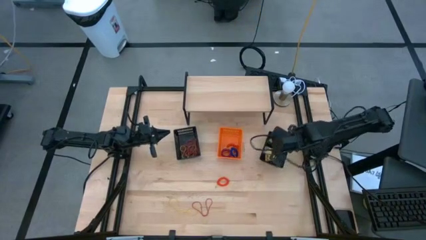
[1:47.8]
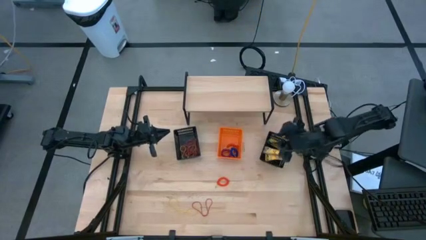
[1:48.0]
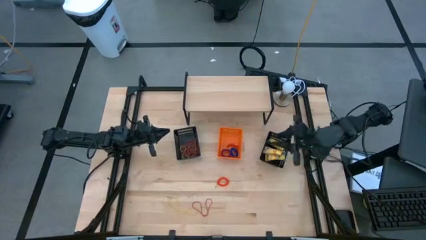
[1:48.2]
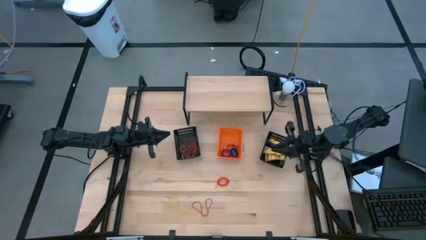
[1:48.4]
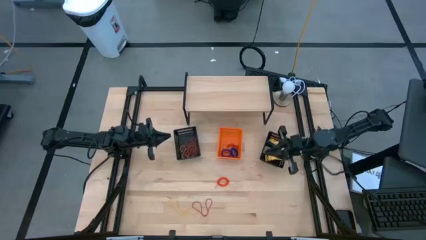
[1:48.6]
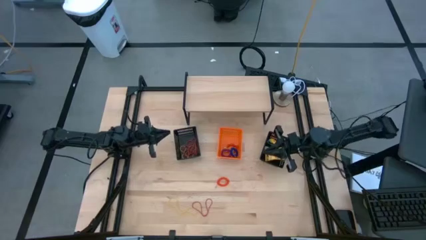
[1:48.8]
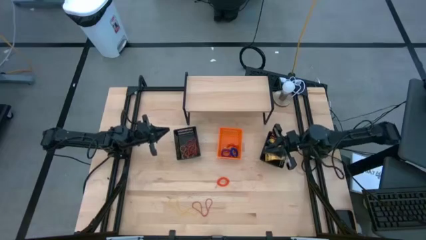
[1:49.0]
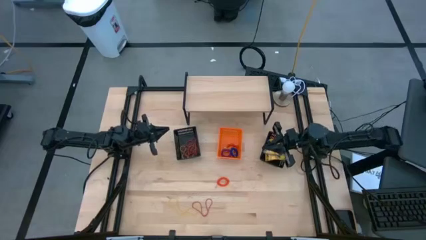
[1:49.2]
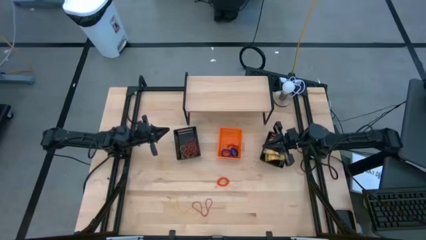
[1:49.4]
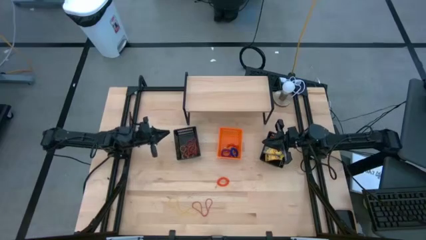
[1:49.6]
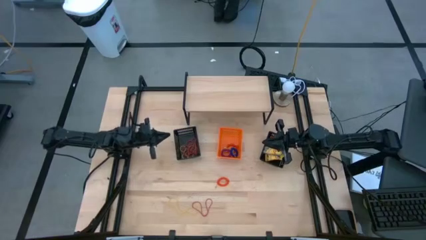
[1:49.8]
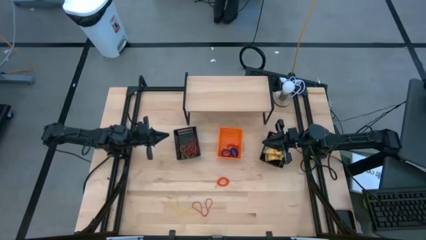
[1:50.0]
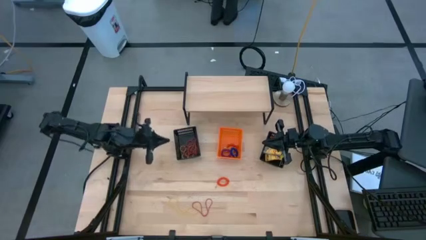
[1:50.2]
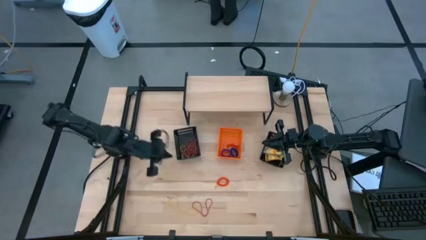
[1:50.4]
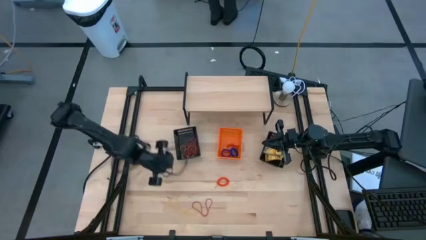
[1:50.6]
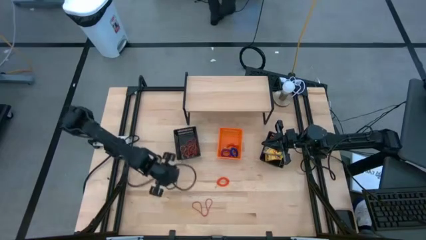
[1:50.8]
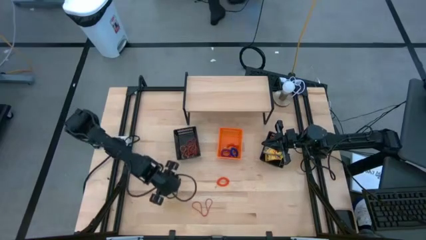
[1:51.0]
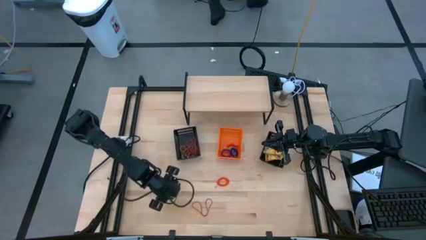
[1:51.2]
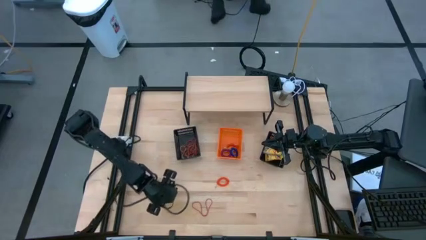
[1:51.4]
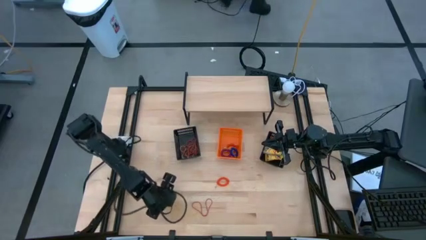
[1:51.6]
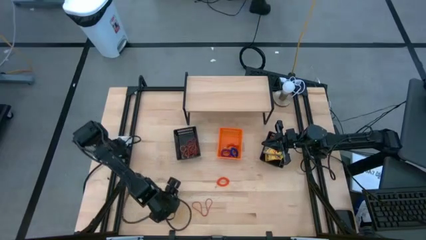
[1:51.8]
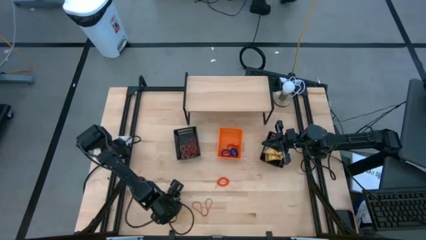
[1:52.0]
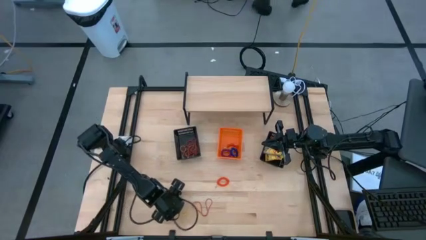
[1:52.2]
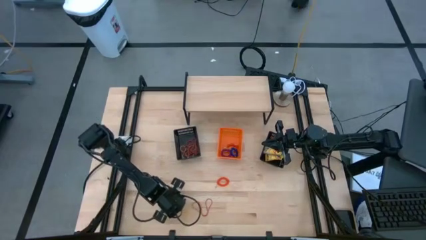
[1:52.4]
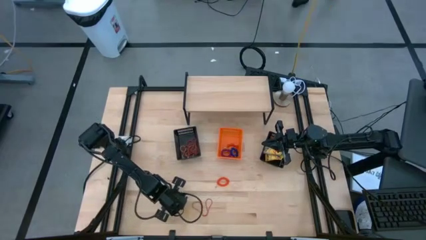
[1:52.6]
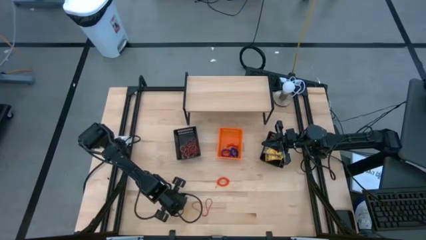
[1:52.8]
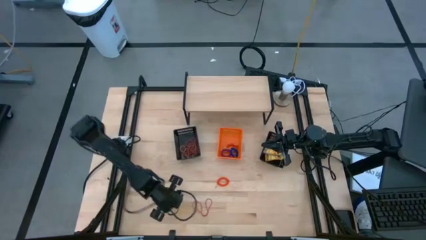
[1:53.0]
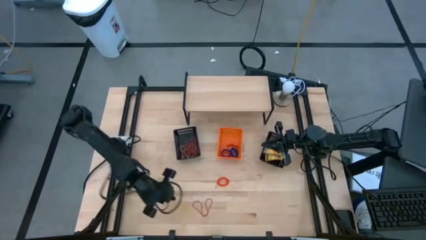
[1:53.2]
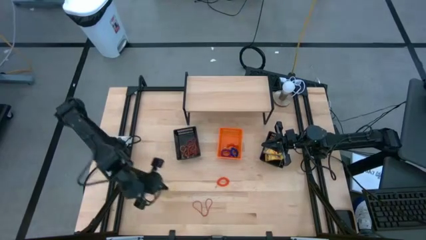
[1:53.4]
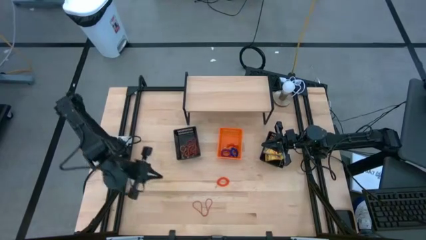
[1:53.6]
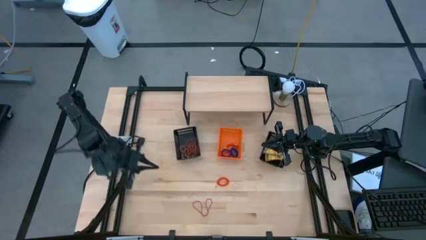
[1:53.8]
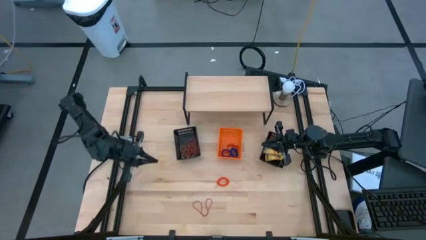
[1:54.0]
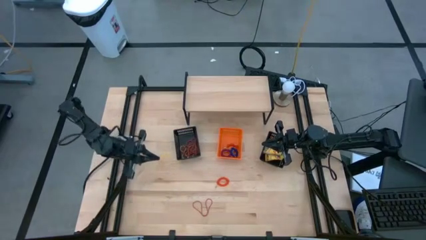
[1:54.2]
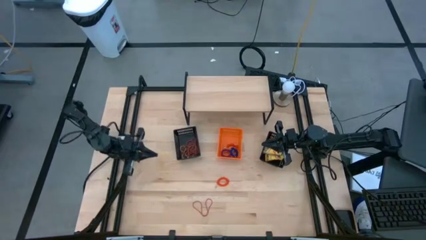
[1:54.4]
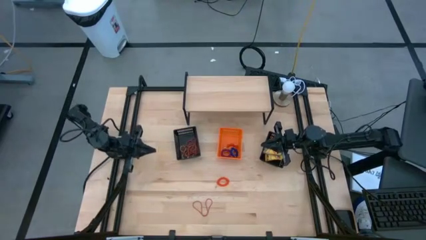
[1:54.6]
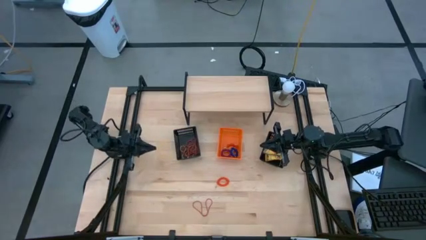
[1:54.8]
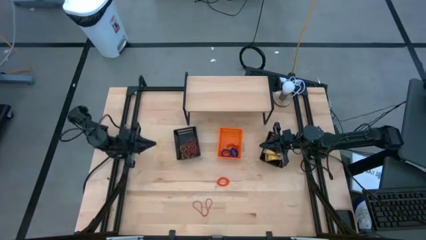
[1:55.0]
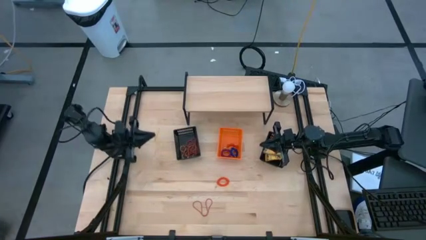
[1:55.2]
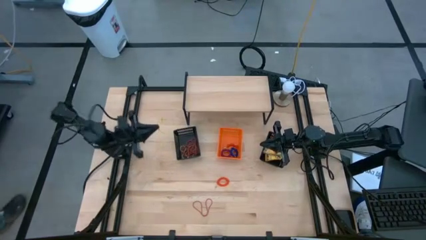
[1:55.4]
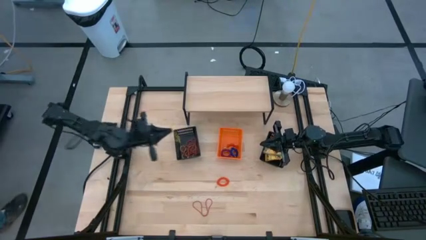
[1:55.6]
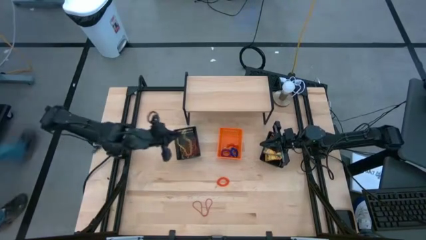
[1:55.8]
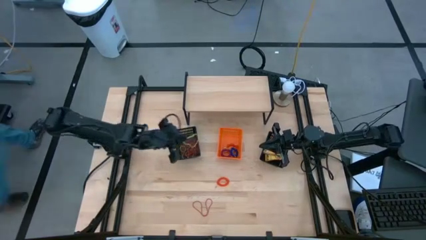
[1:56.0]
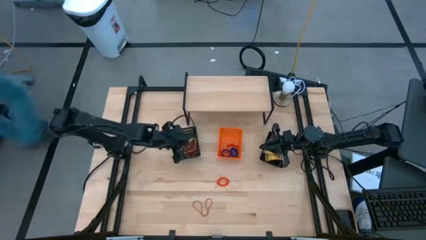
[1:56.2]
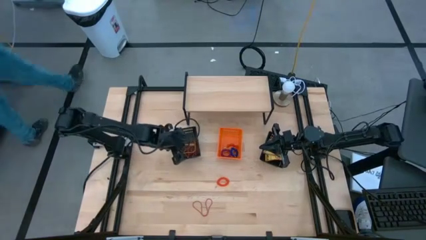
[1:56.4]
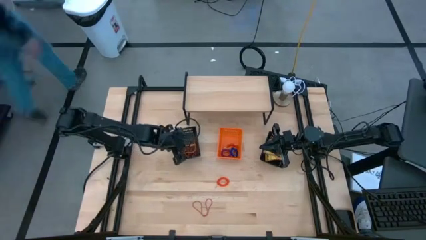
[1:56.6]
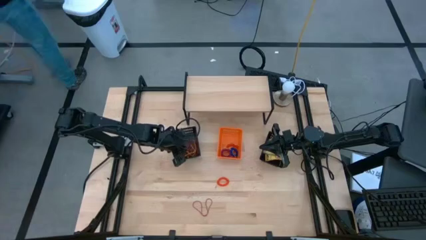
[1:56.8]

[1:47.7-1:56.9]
Task: Pick & Place Office Desk Supplies
Put the yellow rubber band into the left black bin

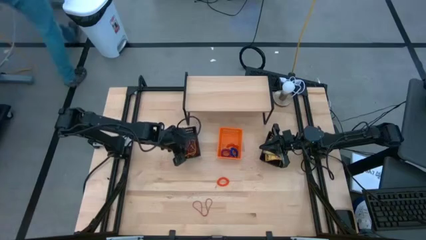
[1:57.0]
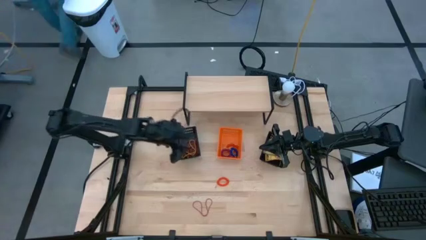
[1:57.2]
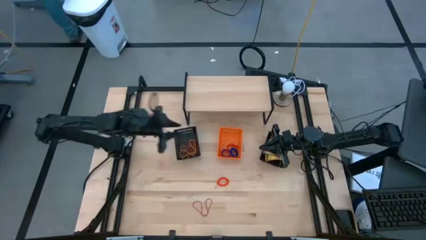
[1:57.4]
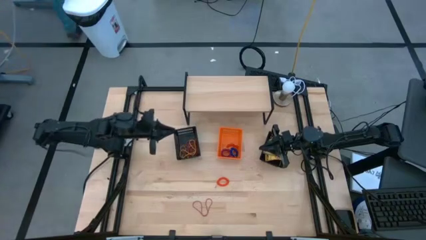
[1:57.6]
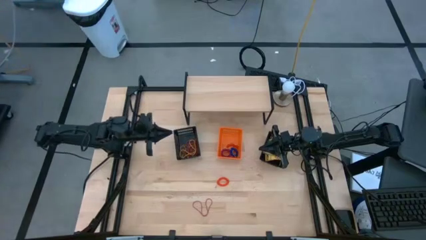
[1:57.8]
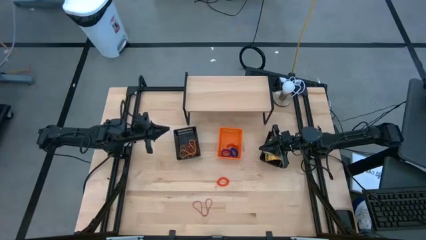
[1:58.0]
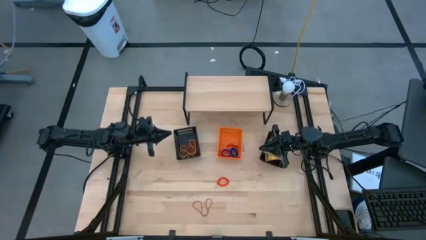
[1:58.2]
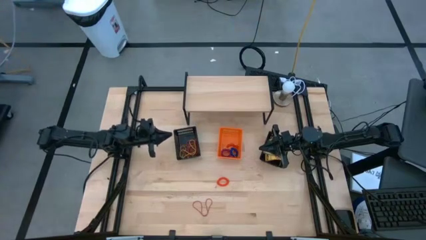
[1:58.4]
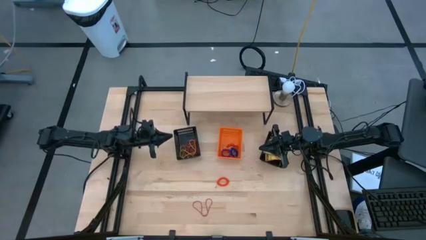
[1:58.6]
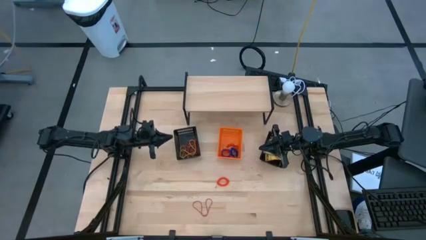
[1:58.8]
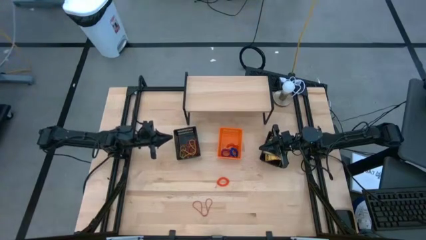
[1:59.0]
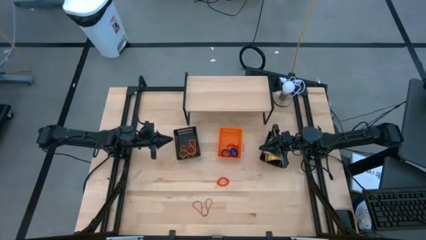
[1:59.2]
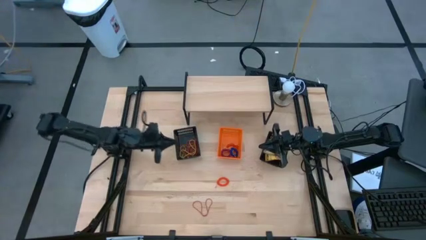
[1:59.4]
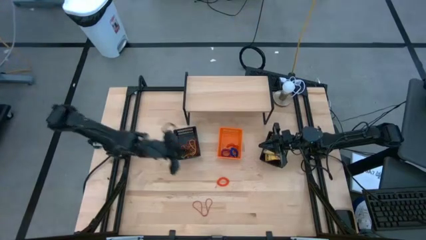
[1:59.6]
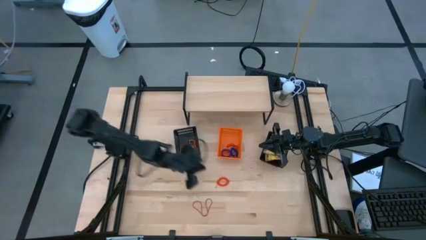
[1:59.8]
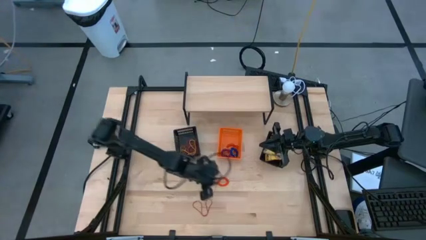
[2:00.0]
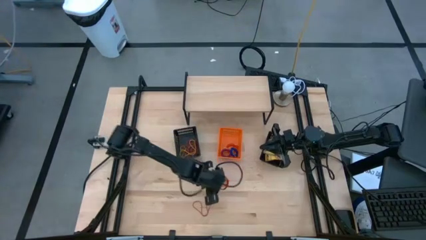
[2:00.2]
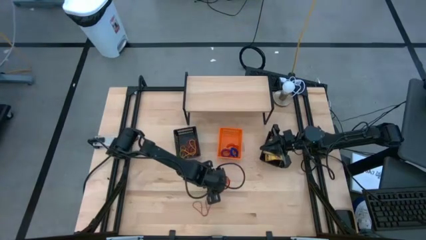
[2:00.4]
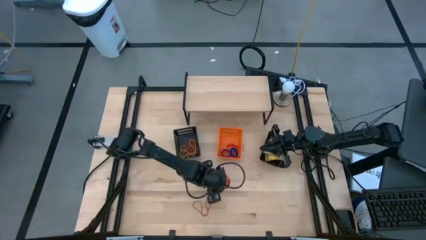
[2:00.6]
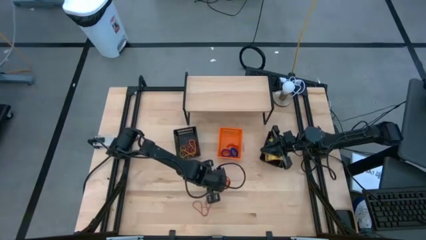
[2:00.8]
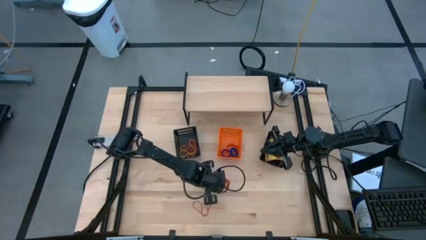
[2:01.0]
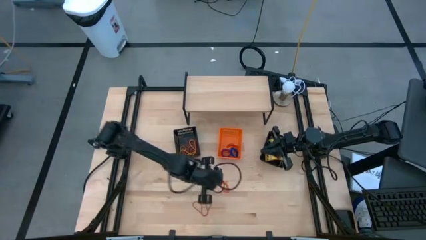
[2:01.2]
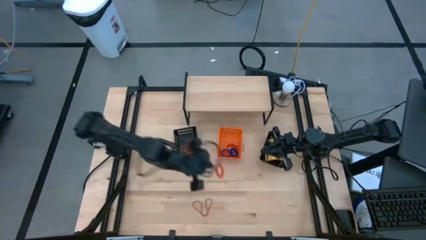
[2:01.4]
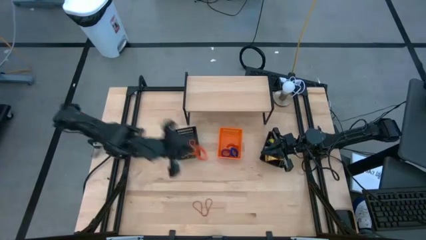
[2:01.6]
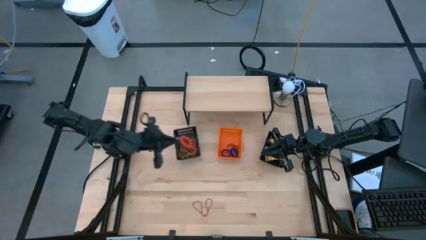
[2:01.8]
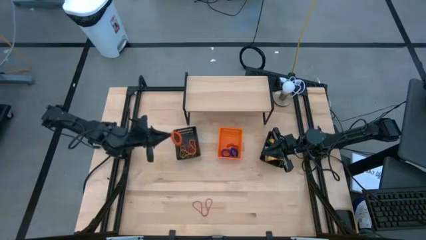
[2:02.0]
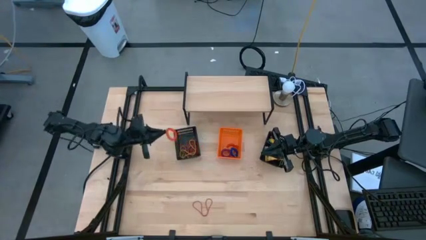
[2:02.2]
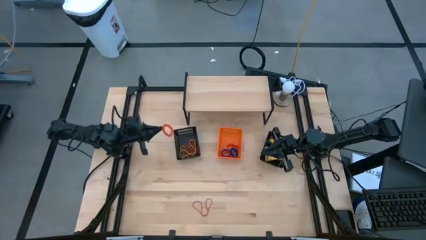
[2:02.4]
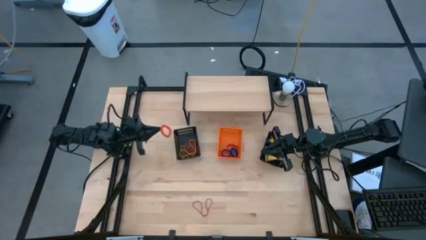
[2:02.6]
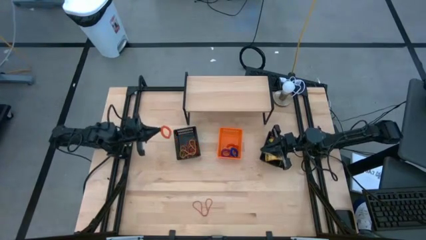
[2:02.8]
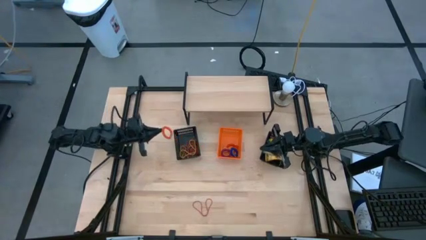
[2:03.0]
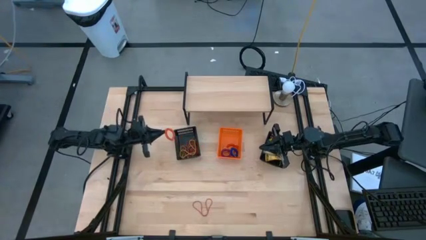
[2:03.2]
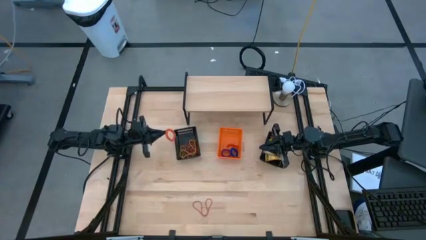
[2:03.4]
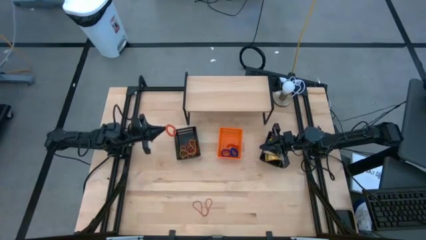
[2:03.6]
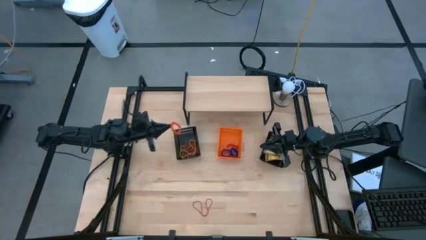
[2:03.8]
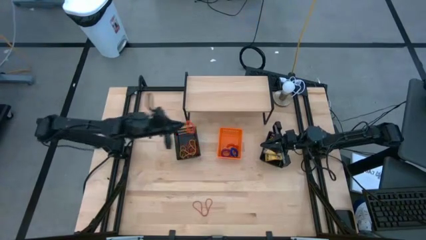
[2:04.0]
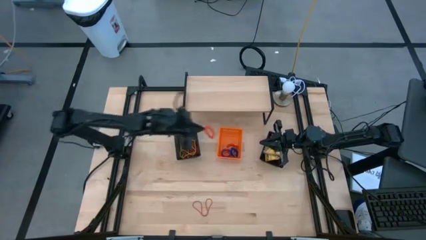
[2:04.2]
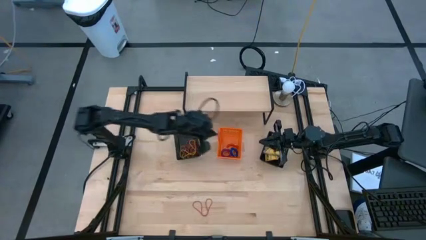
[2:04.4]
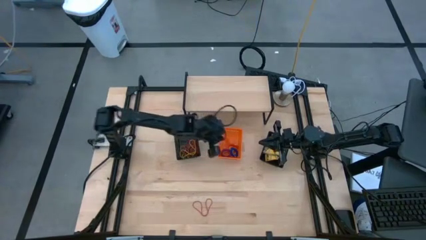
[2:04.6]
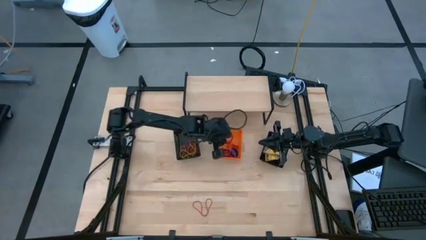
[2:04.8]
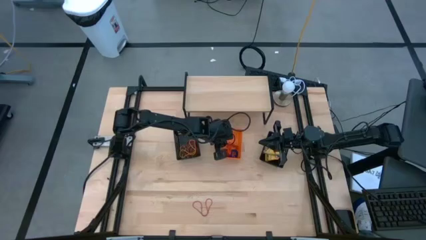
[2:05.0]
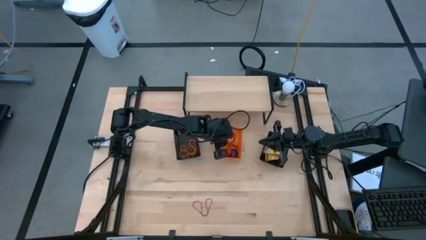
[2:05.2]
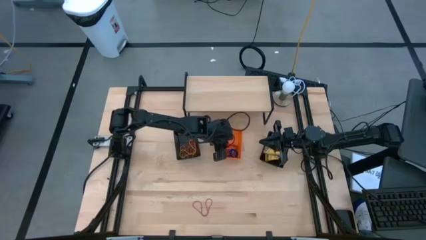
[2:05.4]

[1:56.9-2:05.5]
Put the spring keychain into the orange bin
